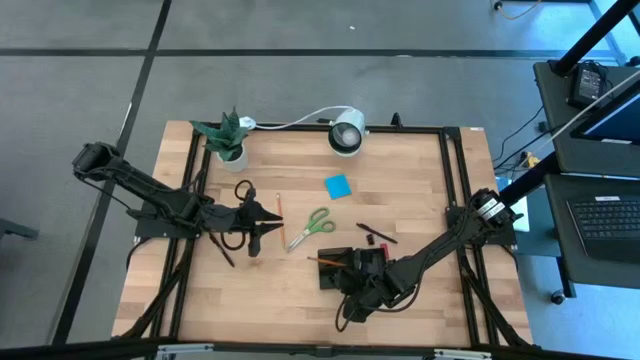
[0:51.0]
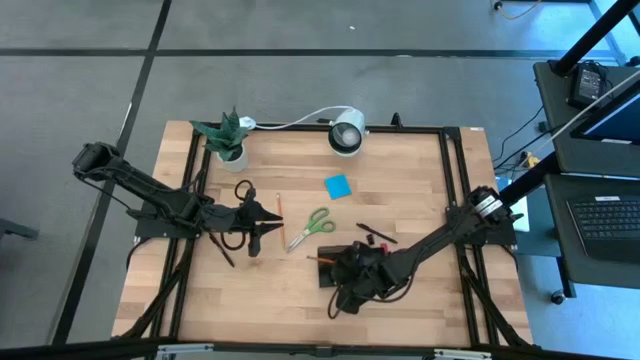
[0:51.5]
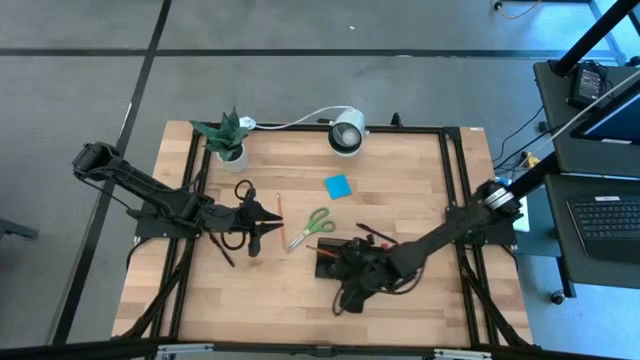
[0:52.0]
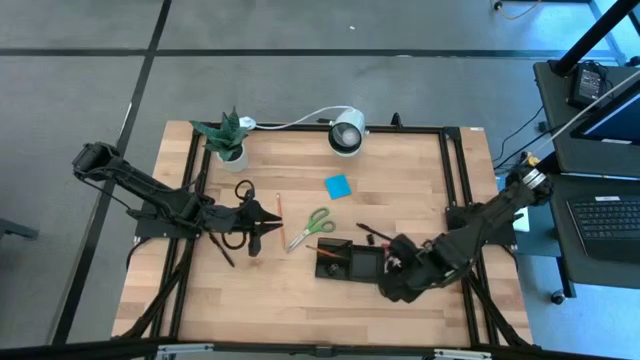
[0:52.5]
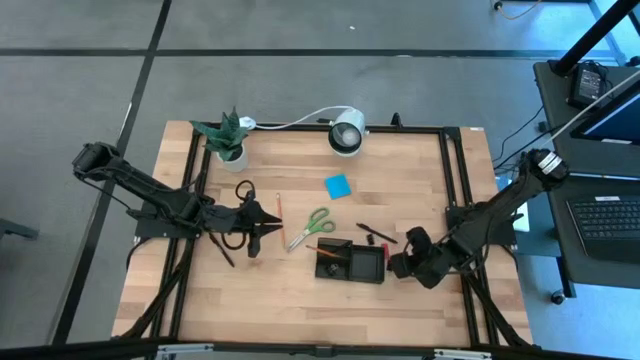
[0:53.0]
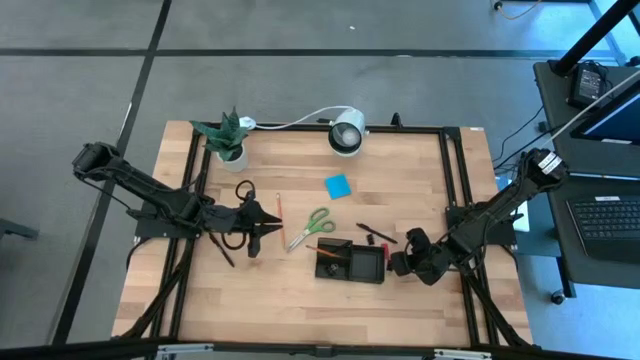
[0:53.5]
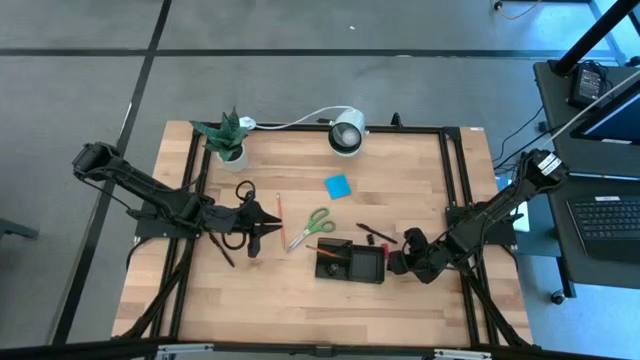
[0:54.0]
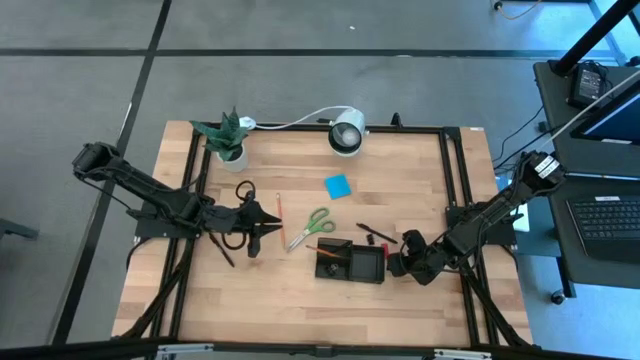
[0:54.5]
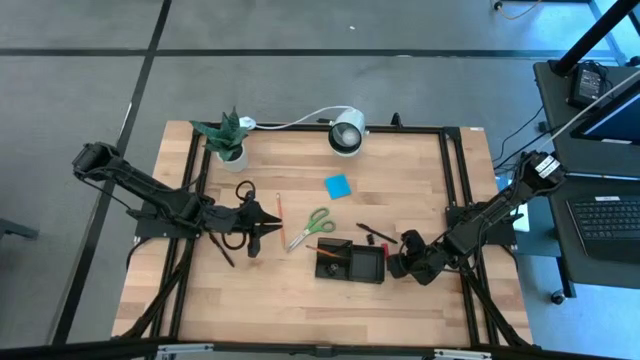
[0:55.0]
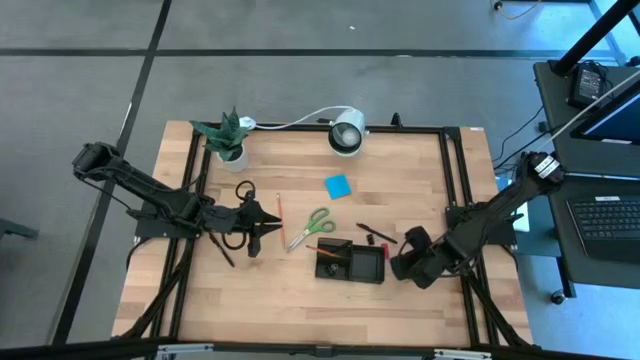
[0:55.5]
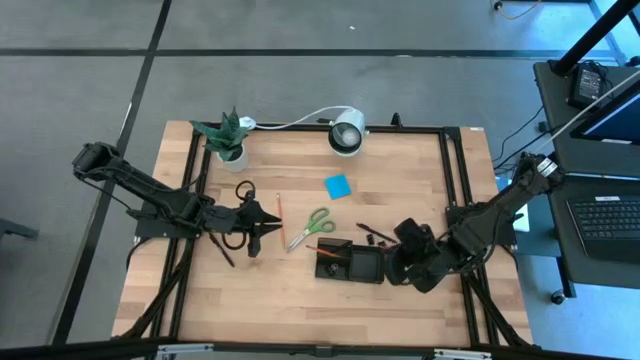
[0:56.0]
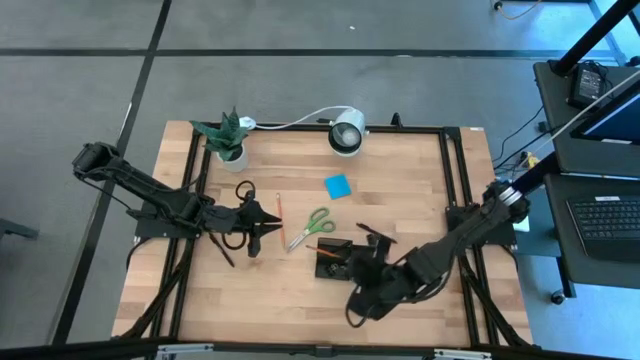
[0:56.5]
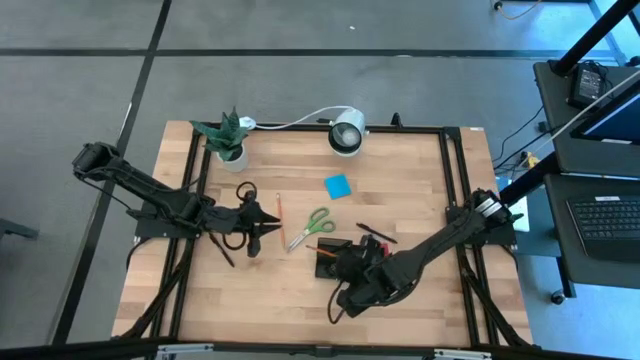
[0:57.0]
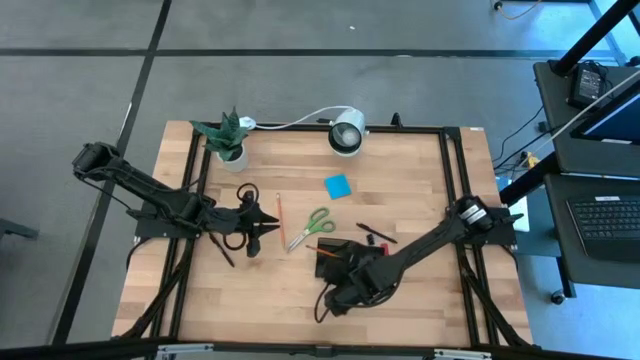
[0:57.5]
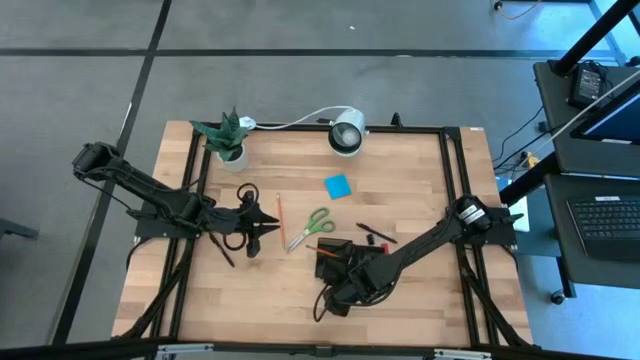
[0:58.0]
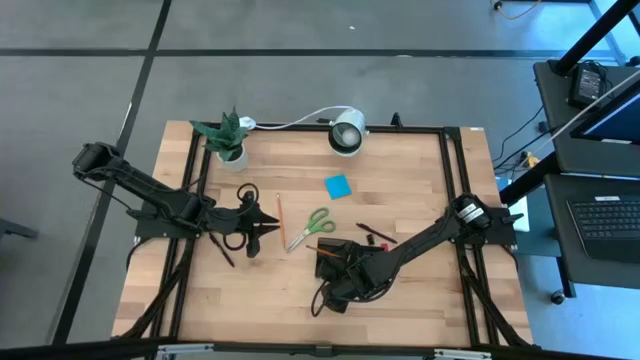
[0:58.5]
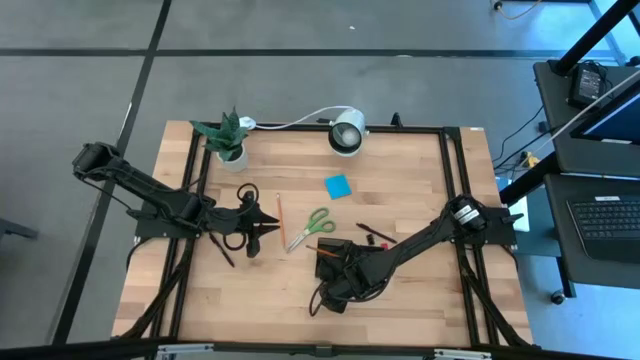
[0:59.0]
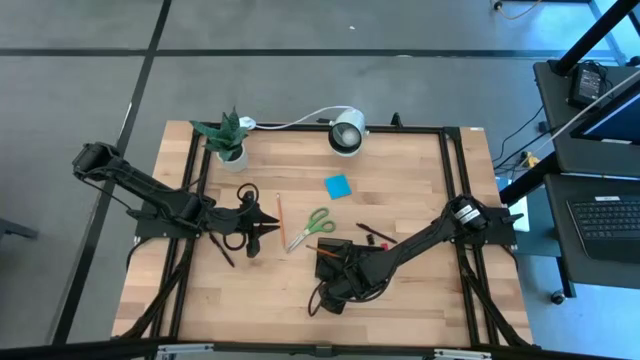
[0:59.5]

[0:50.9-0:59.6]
Task: Pick and place office supplies into organizer
Put the bottom binder clip into the desk organizer

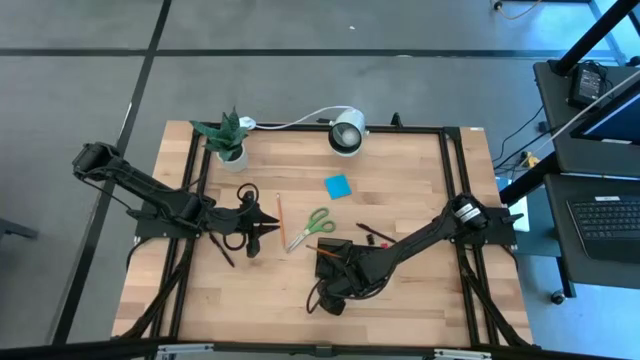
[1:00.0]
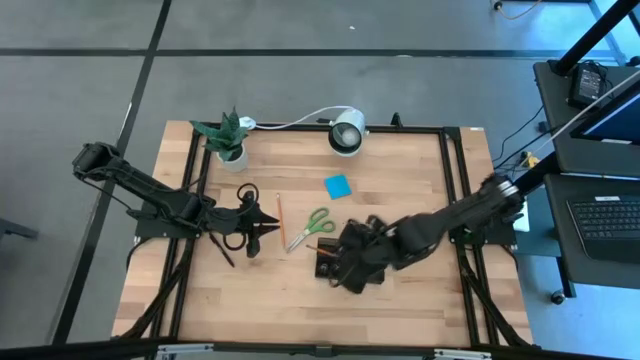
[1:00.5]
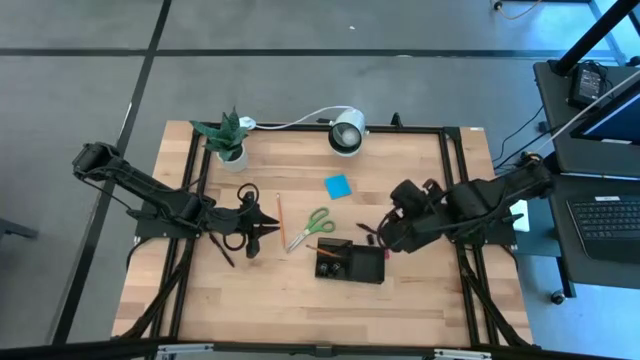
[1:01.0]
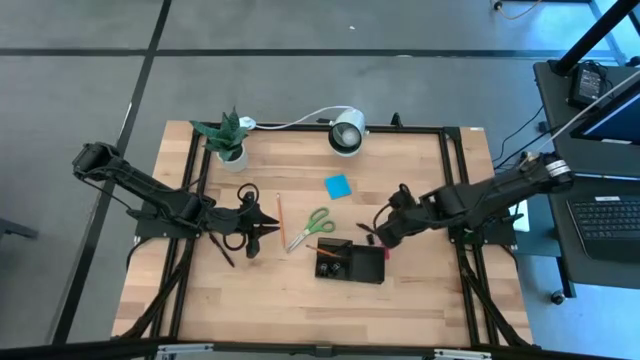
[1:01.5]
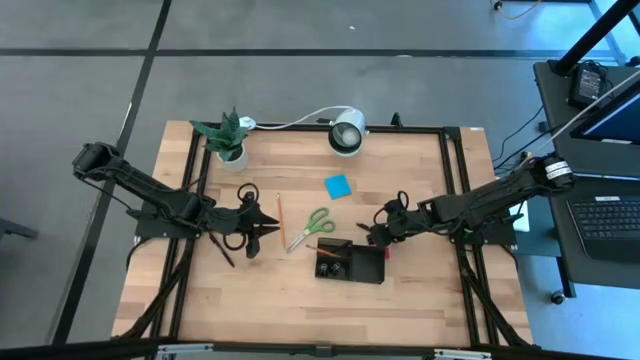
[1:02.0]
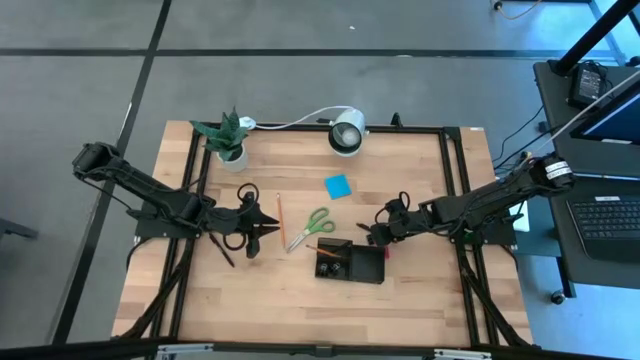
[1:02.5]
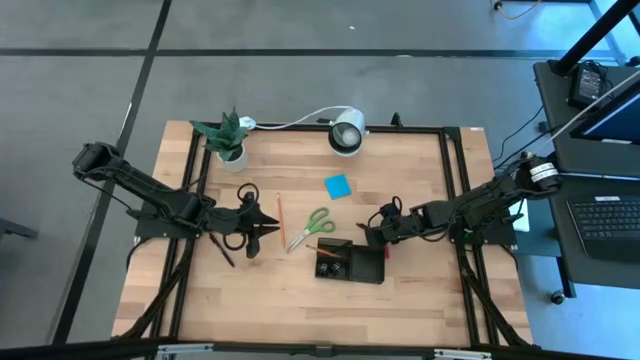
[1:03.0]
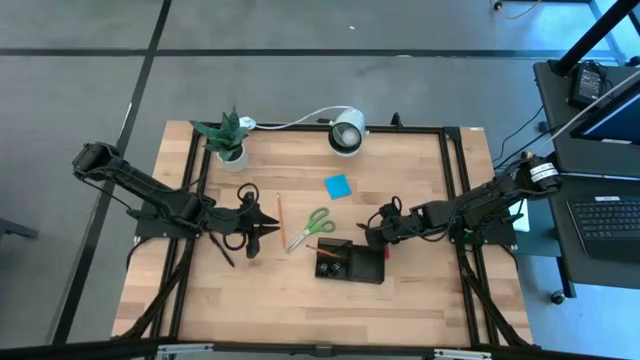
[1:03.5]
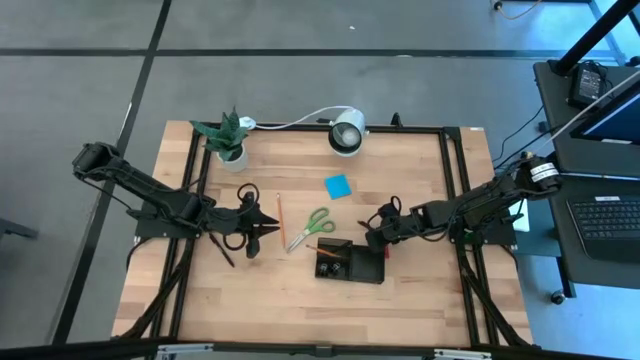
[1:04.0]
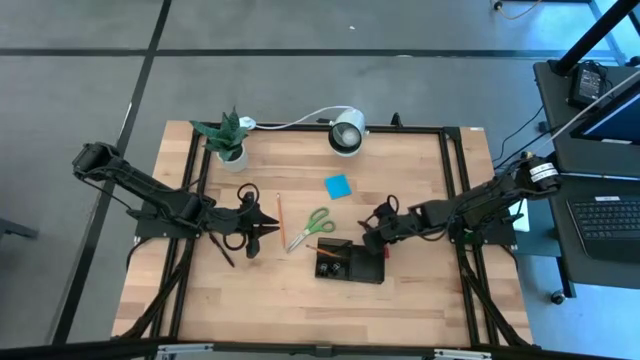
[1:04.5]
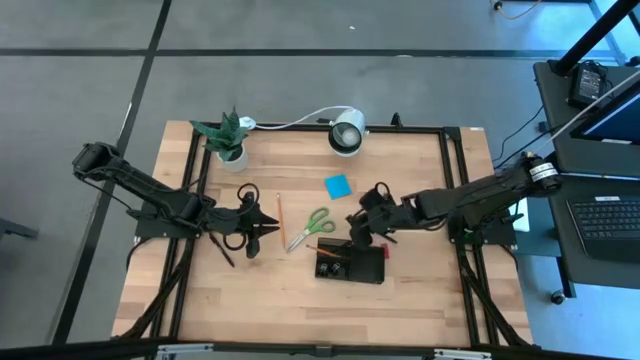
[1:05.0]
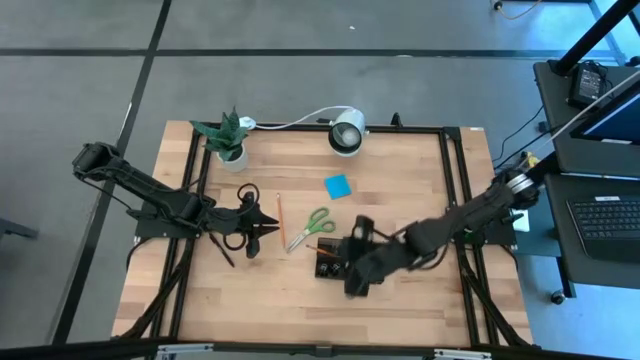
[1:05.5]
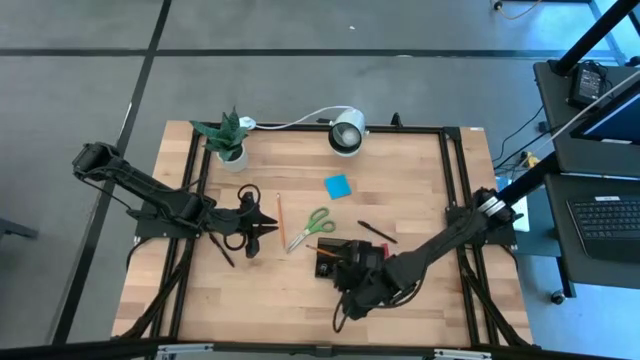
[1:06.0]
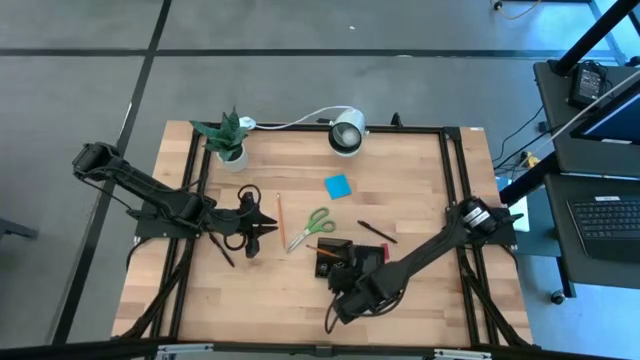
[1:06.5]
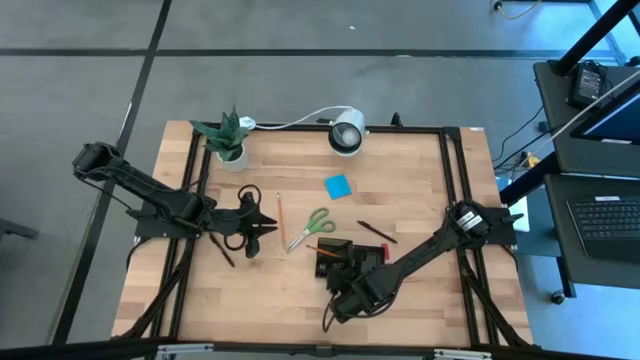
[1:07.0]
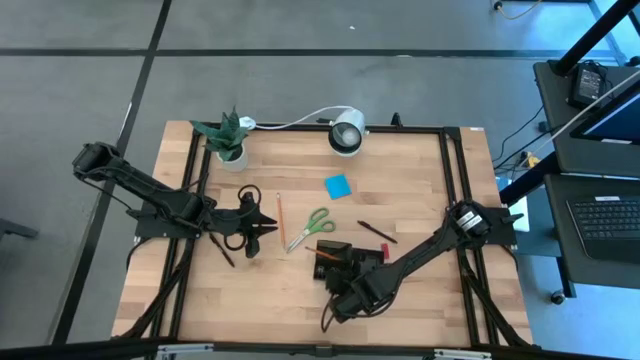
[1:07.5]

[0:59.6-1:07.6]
Put the binder clip into the desk organizer

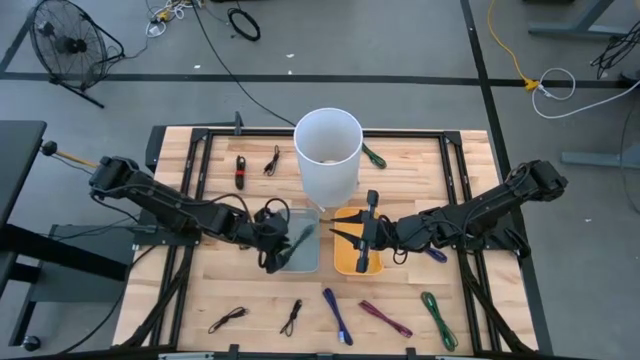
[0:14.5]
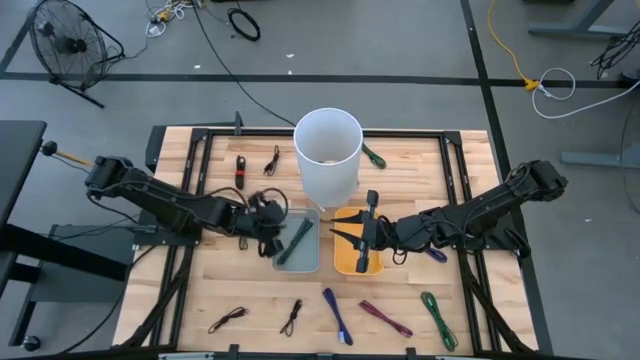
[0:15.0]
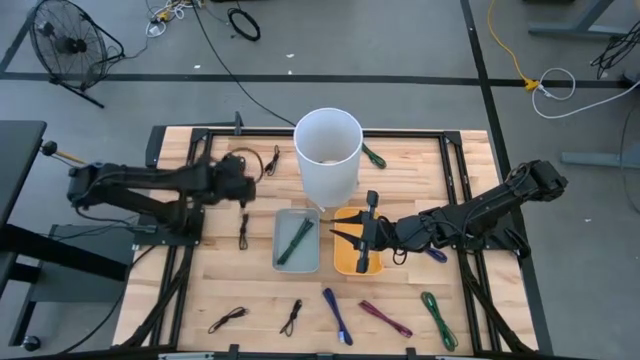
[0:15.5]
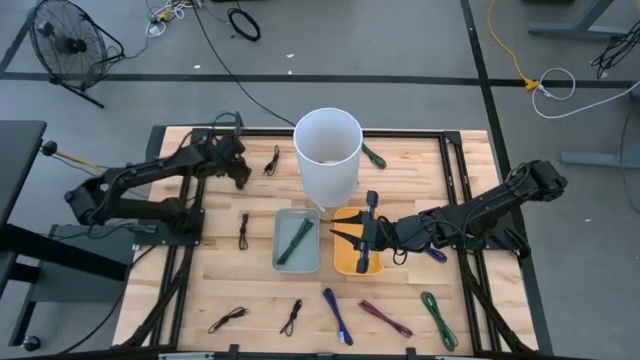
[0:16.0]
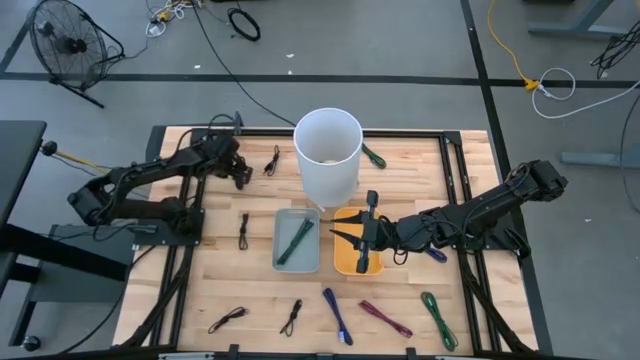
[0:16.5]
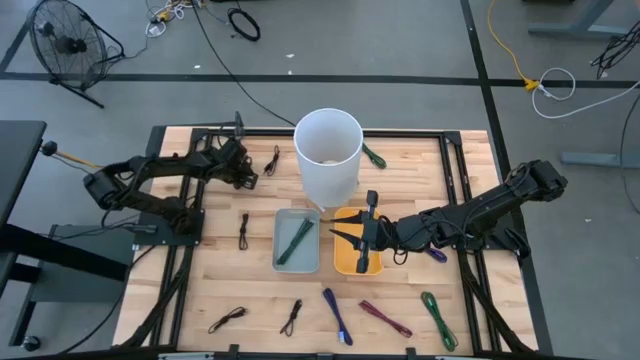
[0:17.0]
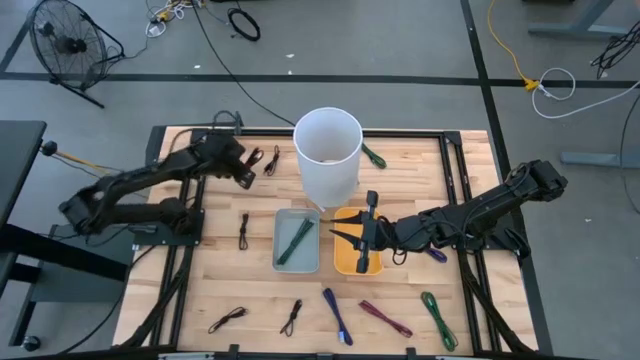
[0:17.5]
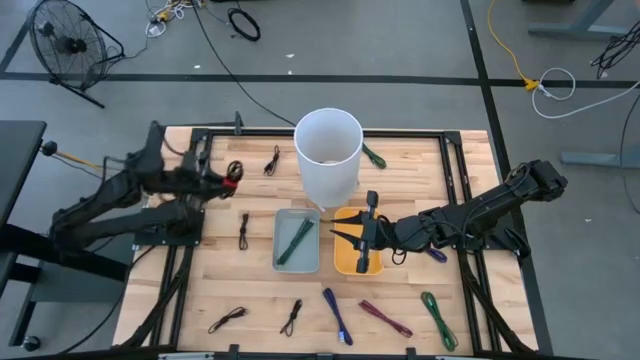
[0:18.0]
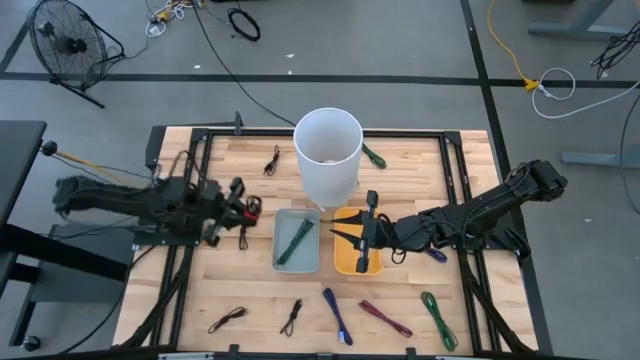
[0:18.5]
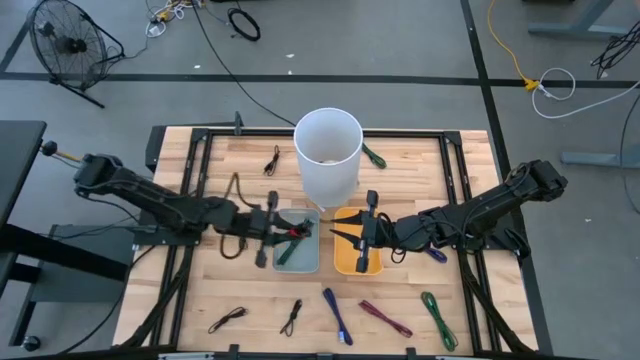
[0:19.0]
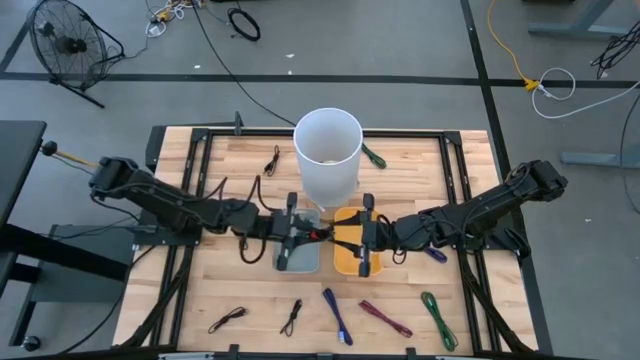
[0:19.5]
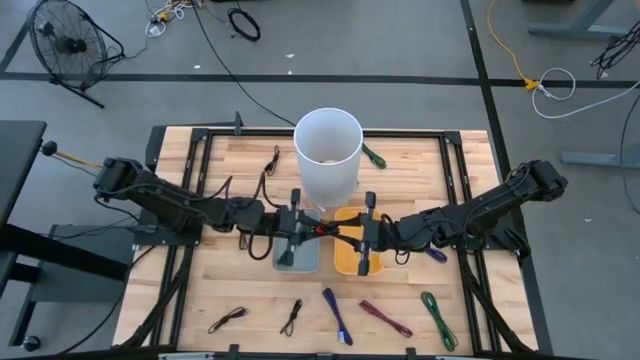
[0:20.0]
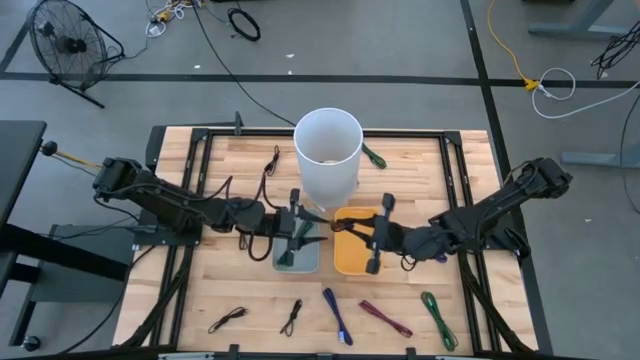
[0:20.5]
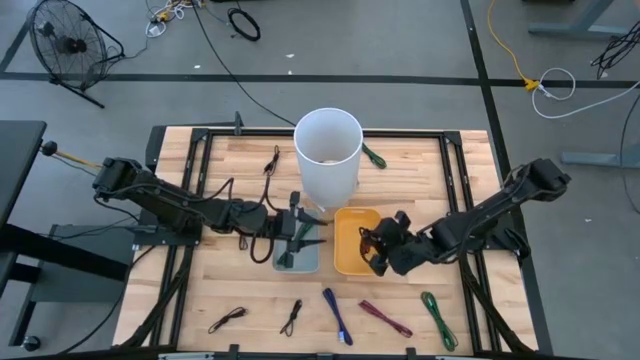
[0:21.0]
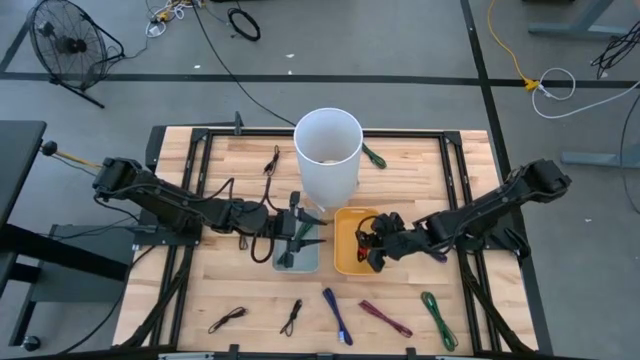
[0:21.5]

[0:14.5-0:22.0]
Task: Pick & Place USB Port
Put the black charger cable into the yellow bin
